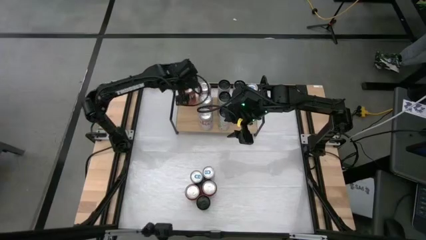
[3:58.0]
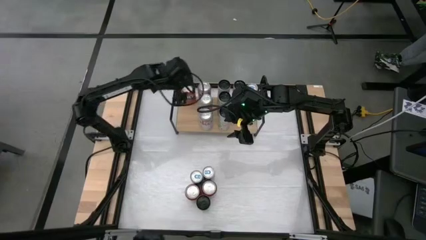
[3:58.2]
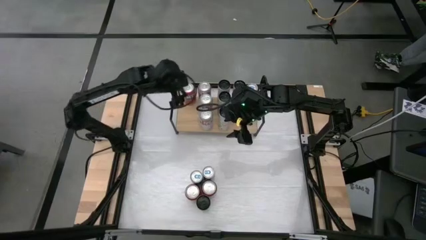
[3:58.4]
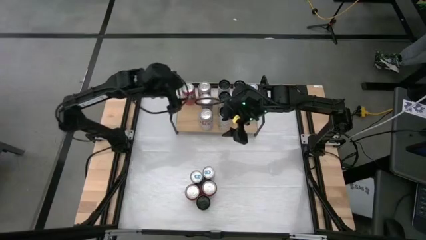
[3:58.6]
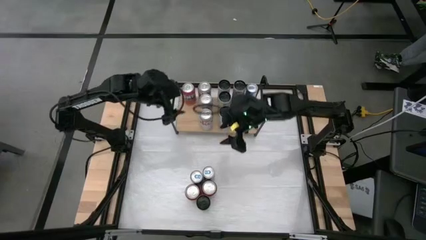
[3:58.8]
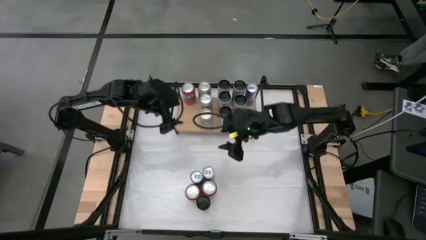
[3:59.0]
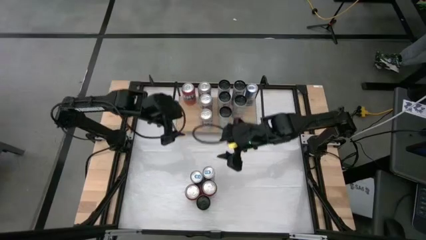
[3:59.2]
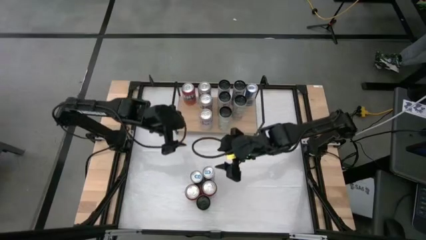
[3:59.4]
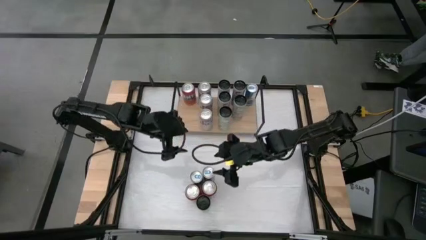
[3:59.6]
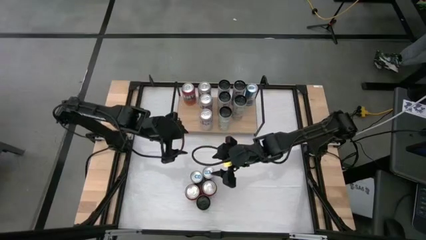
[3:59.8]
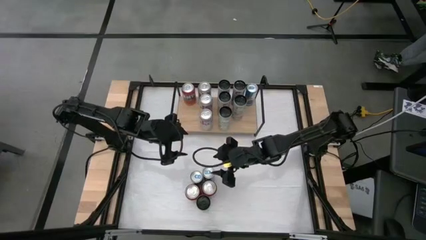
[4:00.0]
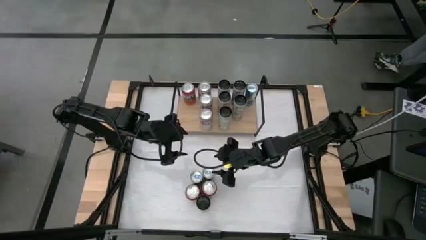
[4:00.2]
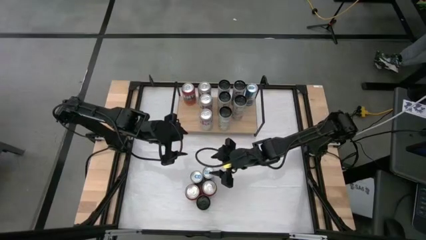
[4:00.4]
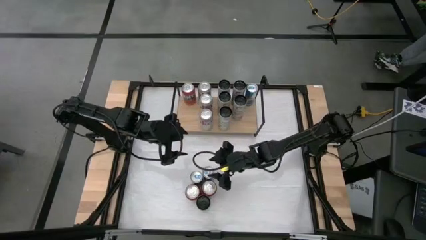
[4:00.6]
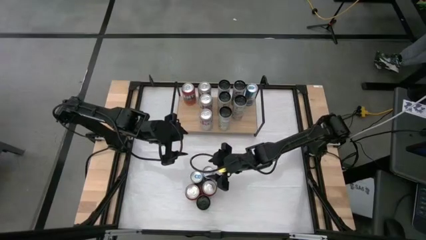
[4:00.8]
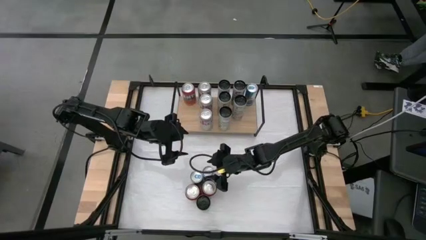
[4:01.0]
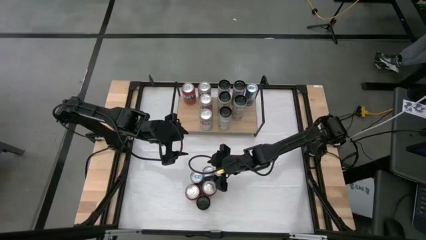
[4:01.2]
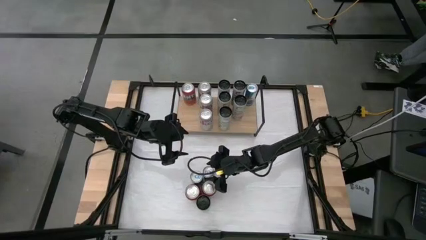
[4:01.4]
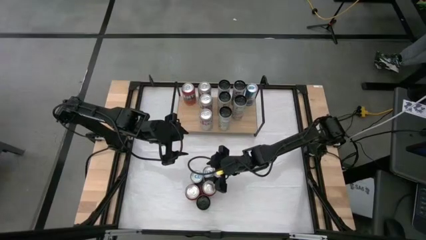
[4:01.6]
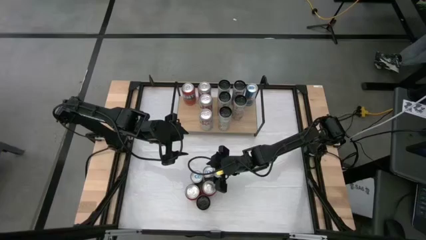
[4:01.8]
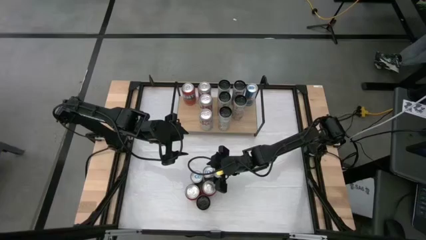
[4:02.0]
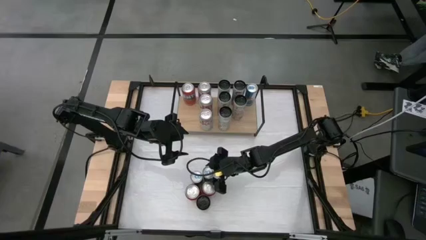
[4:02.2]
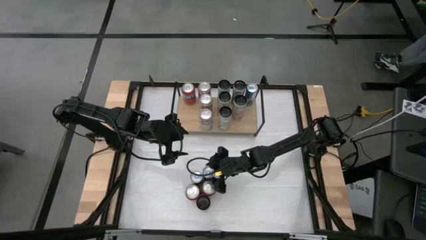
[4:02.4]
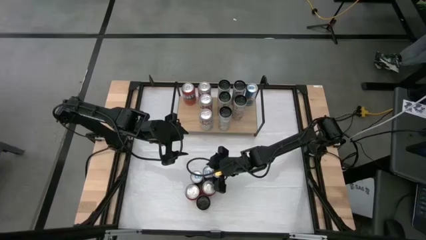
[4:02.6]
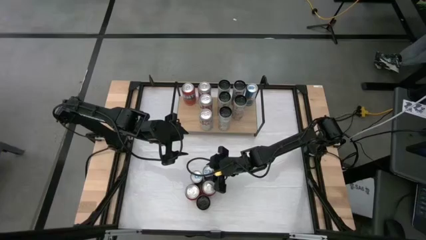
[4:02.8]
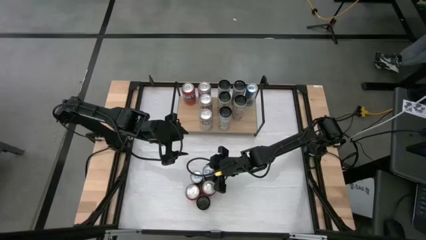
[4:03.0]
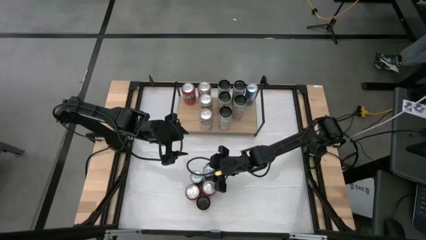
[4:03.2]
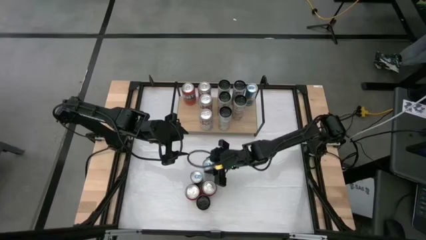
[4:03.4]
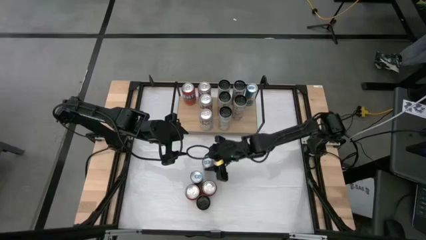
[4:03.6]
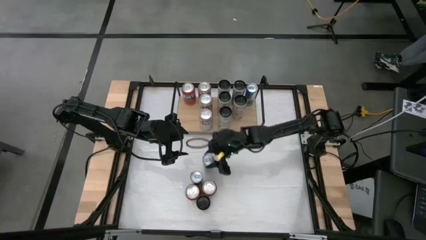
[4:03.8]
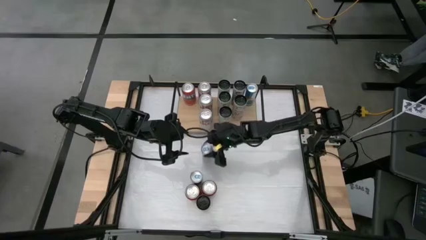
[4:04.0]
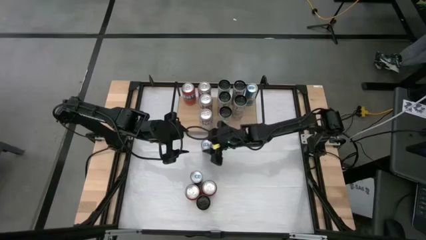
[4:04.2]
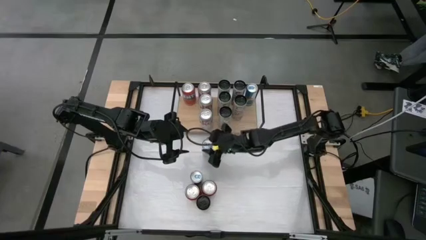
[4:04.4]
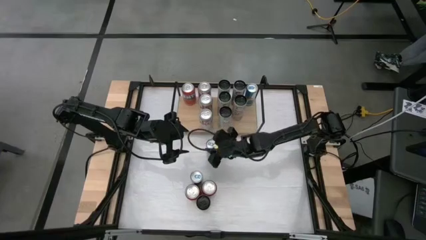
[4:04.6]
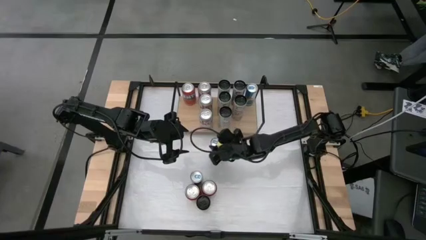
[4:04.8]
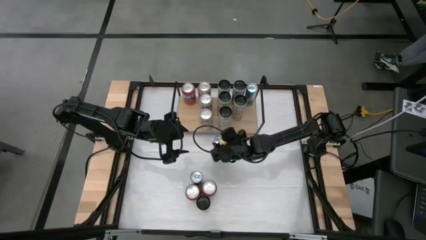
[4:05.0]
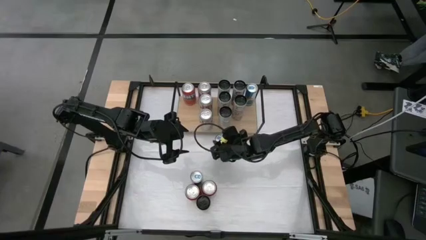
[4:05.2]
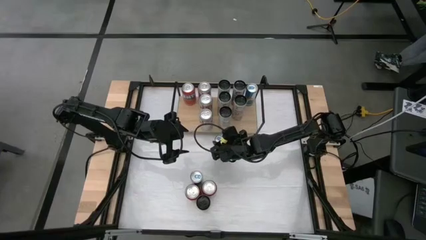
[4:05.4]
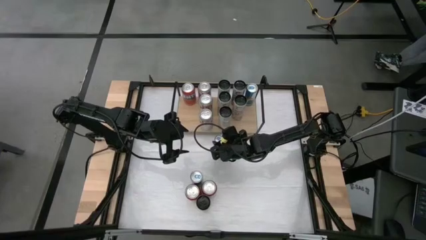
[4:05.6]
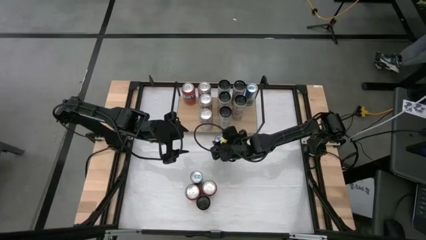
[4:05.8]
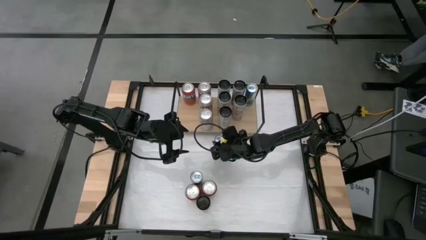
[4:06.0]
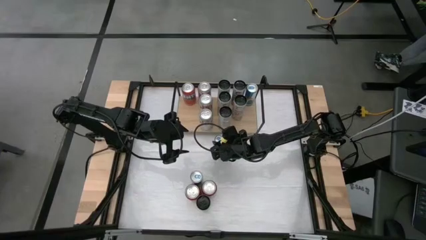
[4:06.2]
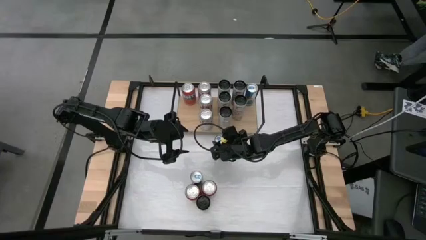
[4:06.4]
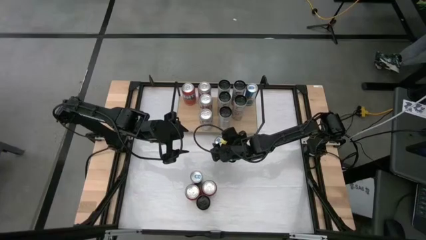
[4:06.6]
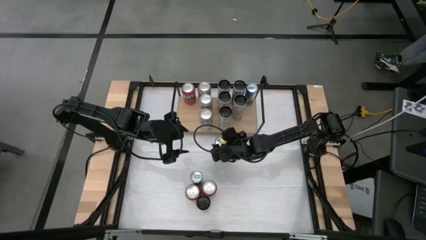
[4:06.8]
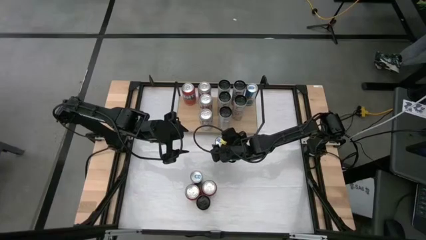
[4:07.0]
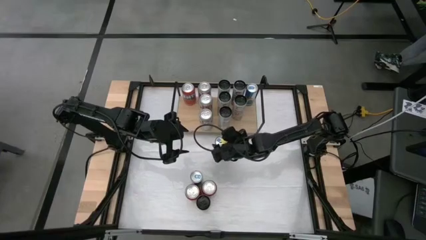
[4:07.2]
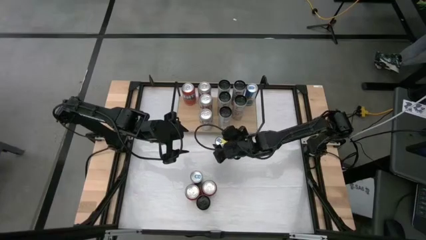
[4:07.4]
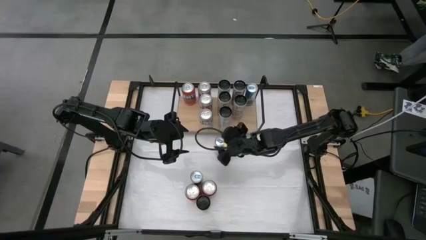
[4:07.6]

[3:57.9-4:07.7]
Task: Place canned beverage on shelf
Put the blue soda can onto the shelf aligned with the other blue soda can

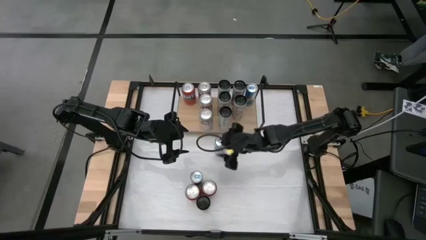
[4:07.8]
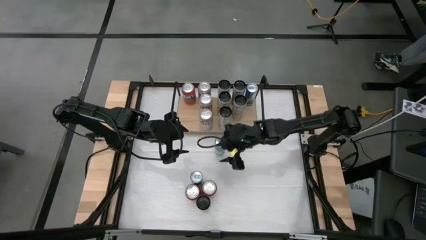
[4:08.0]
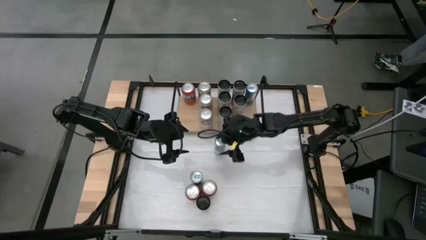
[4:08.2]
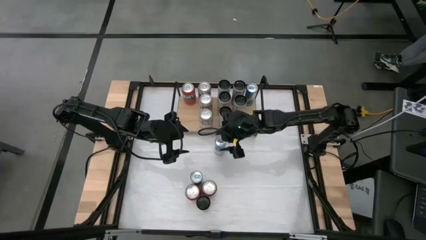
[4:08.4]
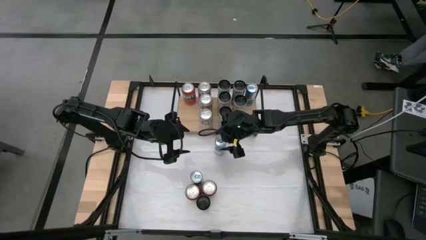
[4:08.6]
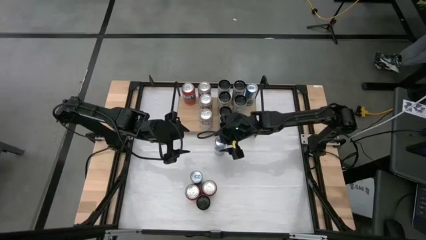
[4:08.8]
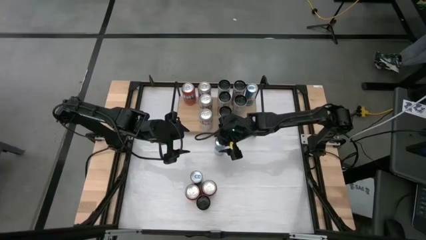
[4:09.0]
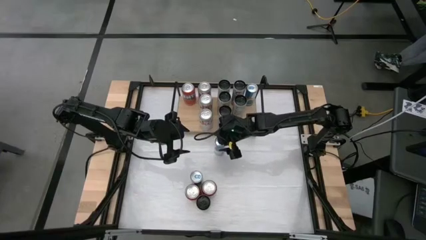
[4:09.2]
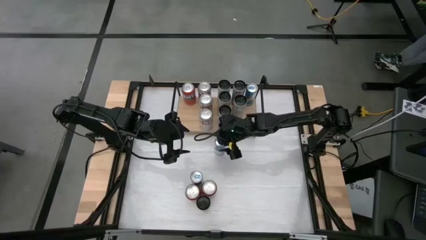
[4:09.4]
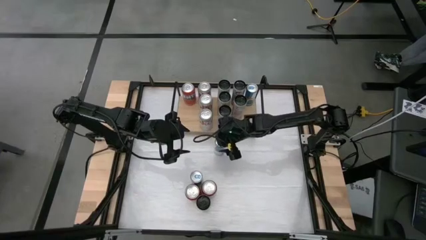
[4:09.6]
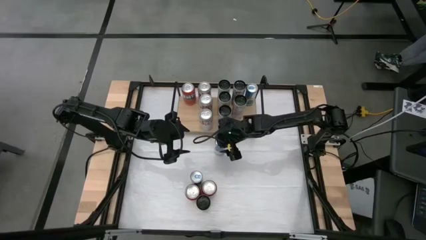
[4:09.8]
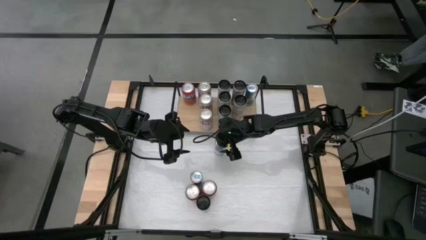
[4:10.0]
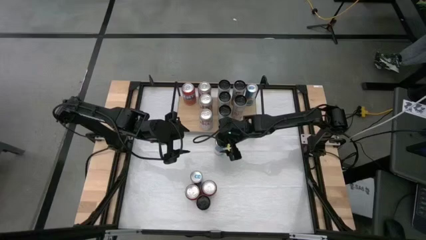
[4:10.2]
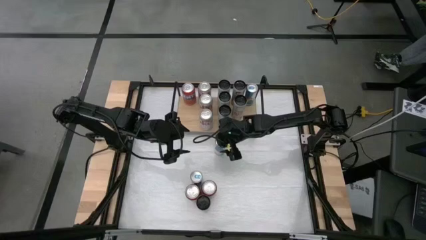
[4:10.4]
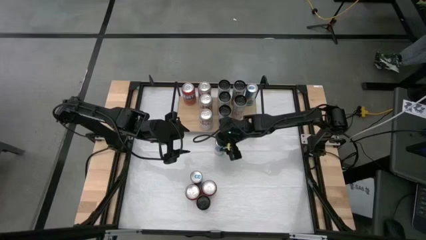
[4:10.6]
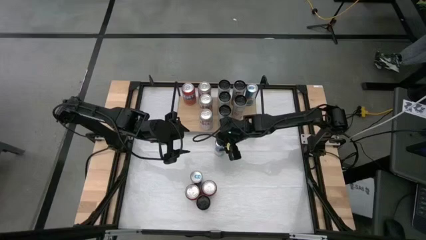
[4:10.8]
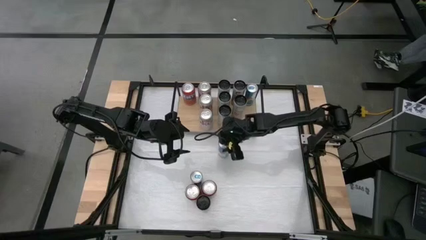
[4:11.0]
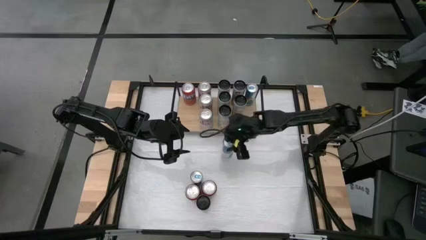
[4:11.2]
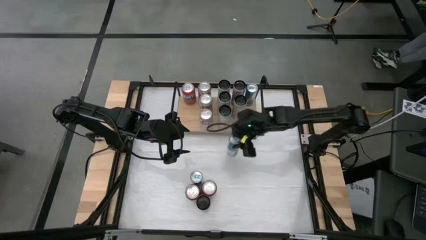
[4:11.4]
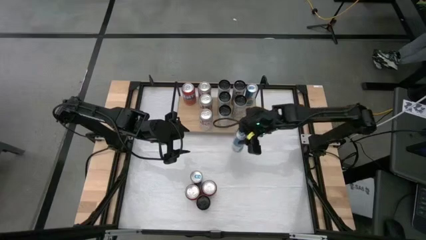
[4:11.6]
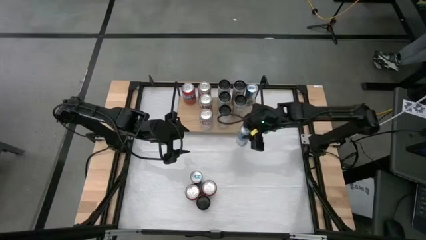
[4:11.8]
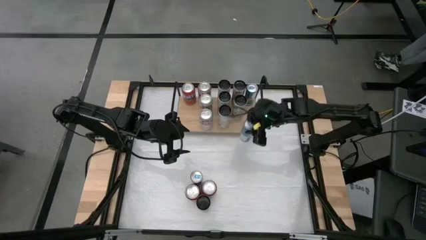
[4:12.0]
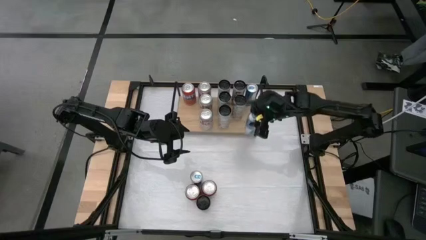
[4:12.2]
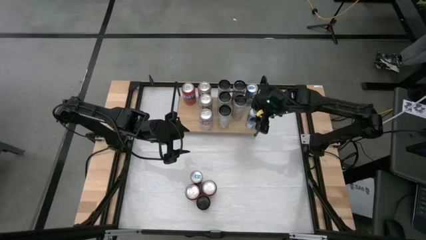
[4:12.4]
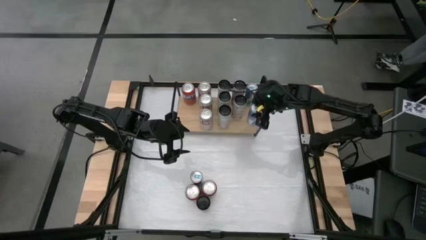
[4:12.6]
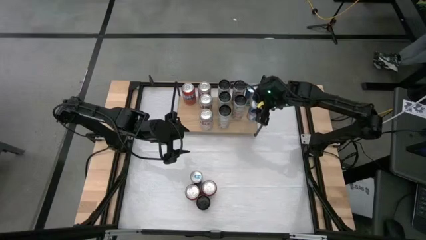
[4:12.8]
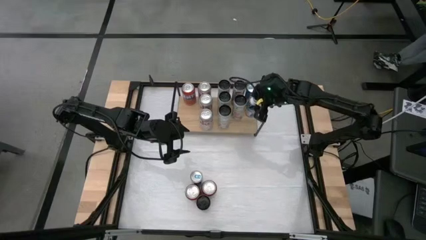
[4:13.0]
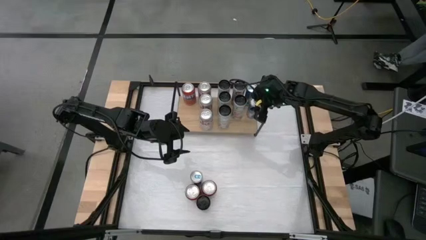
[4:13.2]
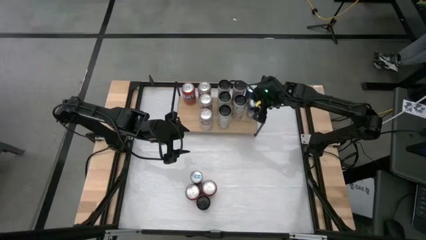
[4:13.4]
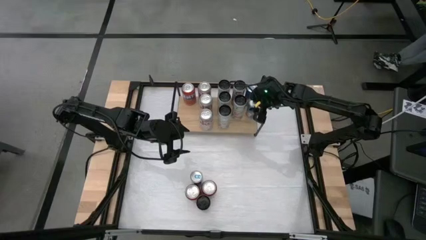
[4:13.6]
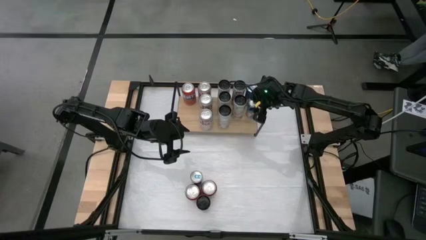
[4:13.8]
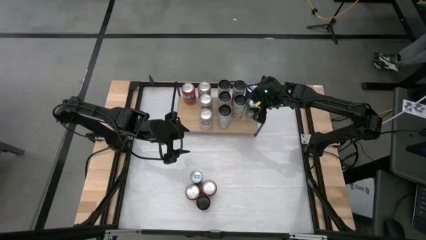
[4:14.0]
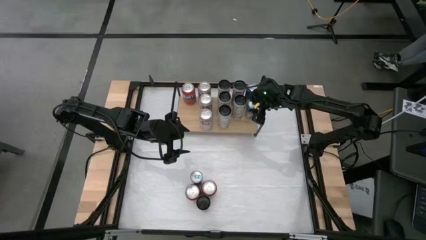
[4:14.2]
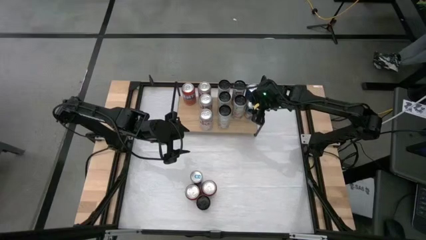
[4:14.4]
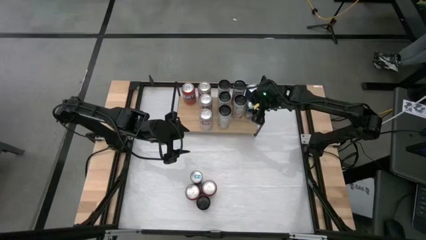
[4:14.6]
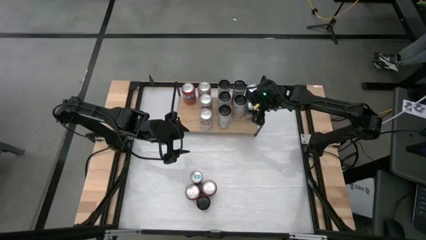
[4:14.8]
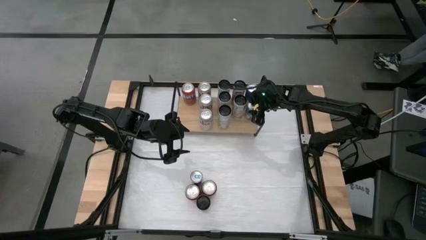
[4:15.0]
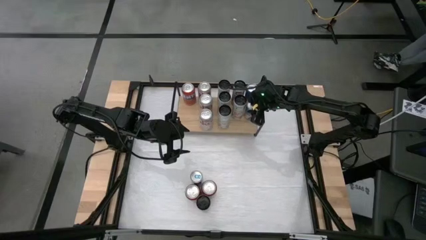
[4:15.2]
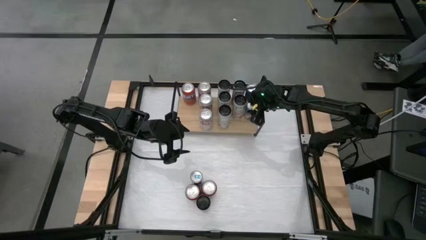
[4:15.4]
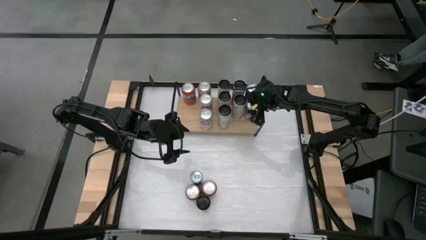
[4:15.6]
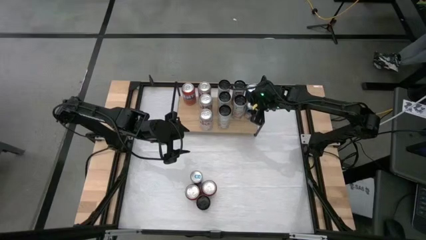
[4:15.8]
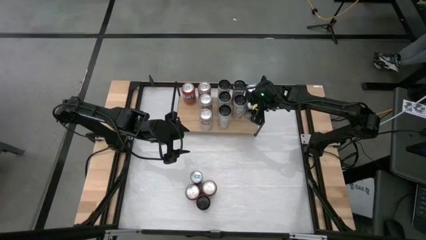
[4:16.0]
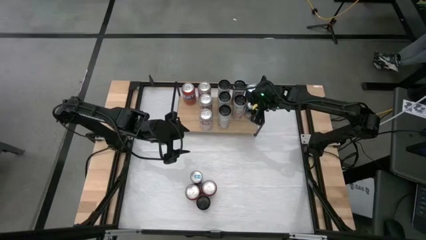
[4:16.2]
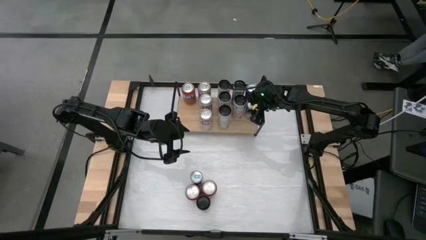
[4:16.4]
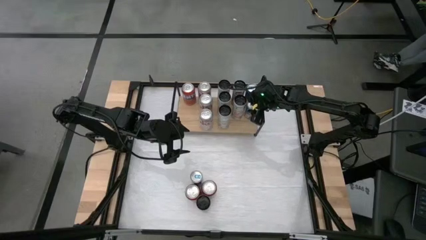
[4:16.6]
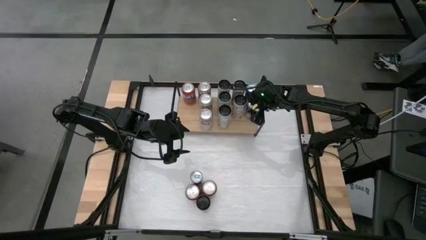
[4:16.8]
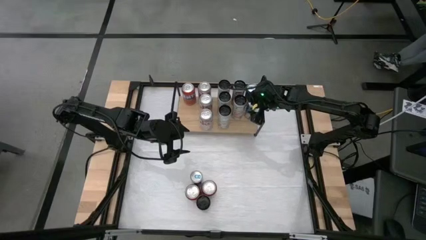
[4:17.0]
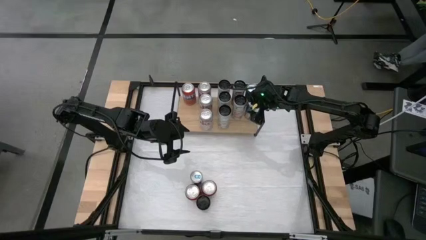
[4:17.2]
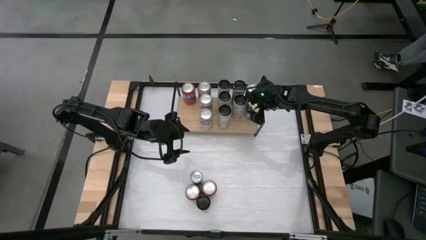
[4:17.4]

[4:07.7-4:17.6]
Put the blue soda can onto the shelf aligned with the other blue soda can
